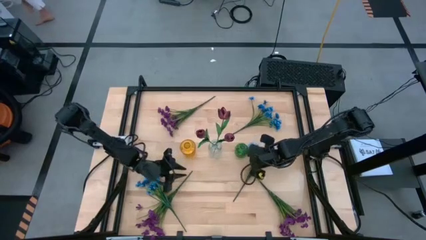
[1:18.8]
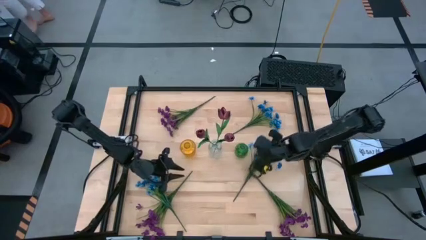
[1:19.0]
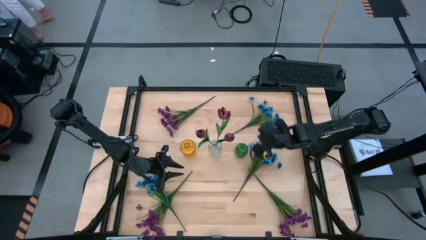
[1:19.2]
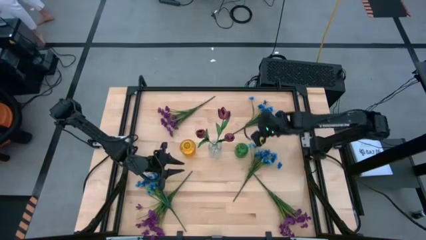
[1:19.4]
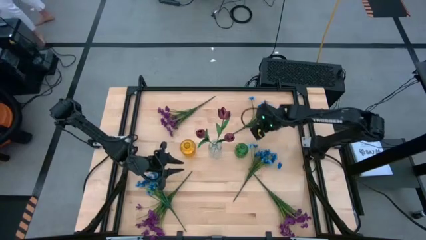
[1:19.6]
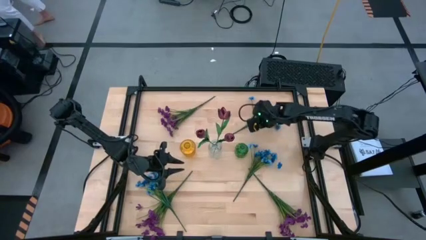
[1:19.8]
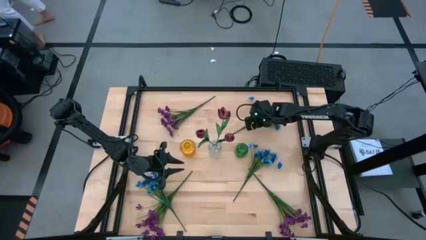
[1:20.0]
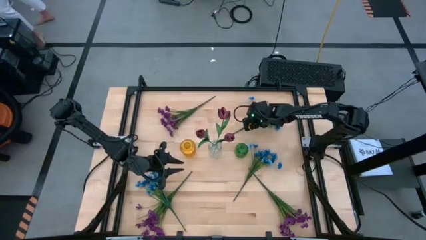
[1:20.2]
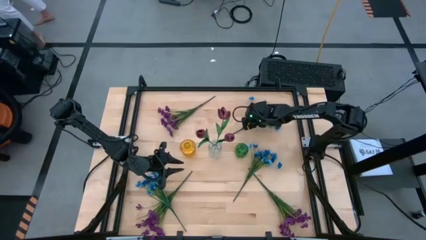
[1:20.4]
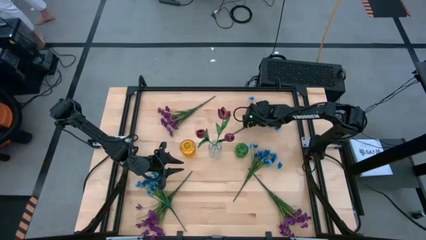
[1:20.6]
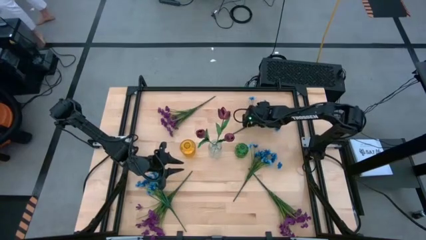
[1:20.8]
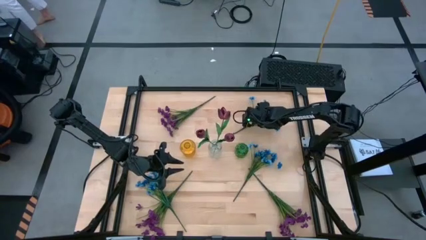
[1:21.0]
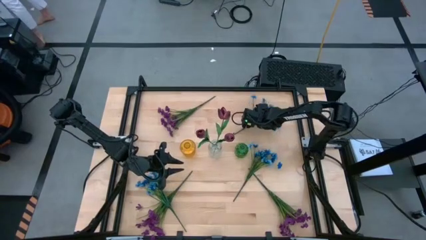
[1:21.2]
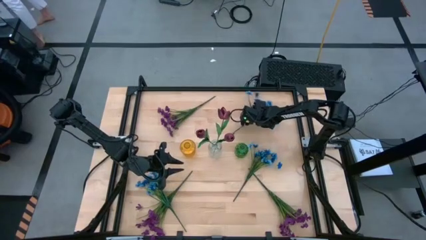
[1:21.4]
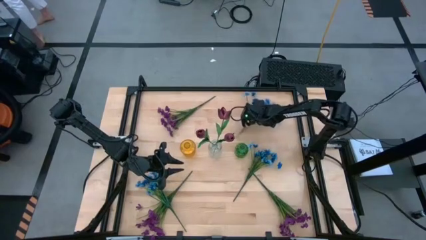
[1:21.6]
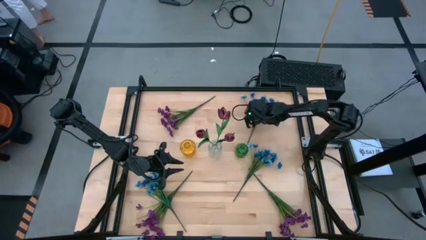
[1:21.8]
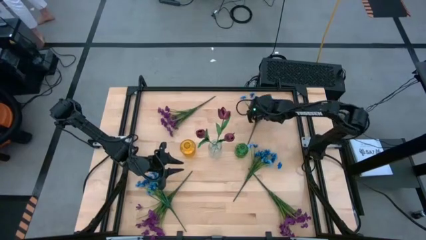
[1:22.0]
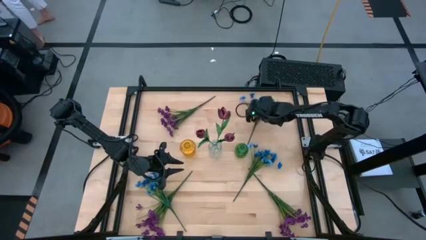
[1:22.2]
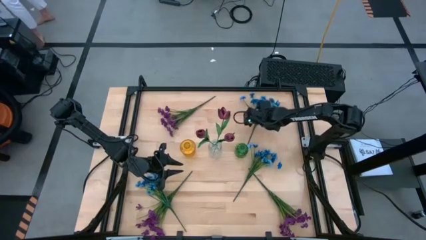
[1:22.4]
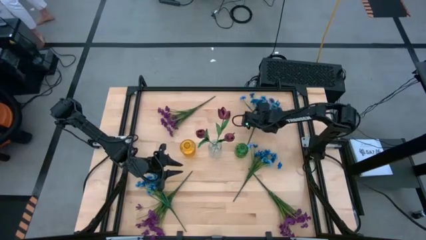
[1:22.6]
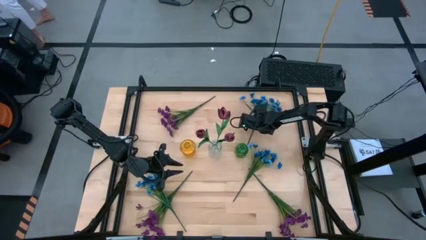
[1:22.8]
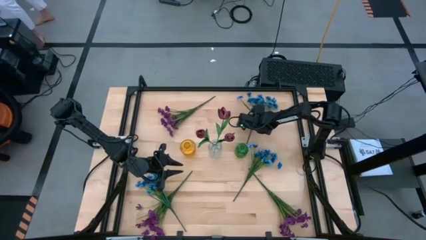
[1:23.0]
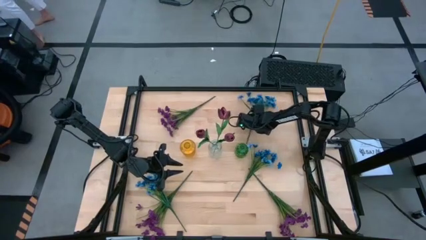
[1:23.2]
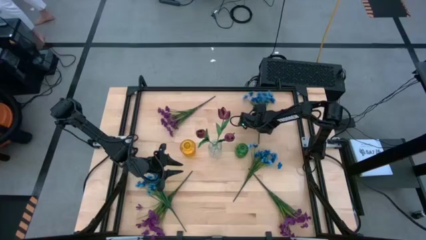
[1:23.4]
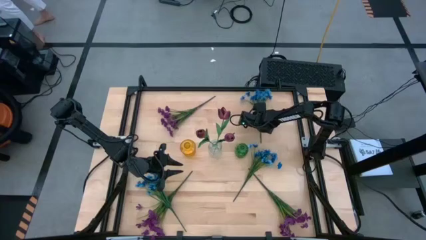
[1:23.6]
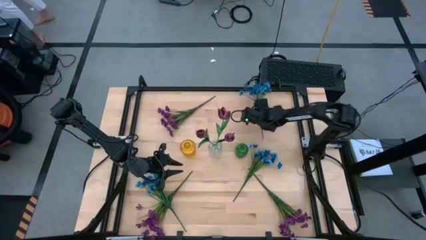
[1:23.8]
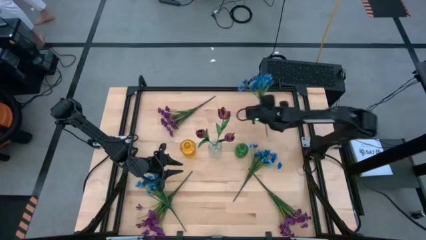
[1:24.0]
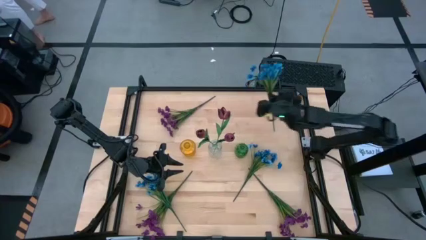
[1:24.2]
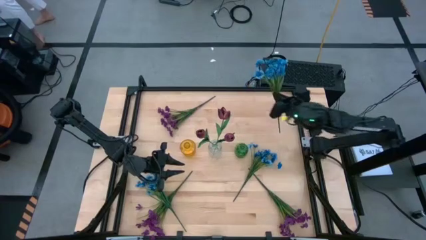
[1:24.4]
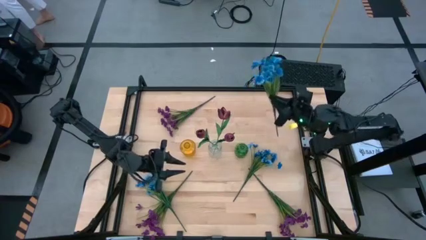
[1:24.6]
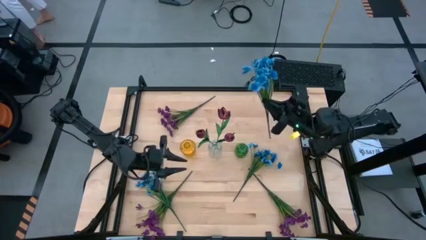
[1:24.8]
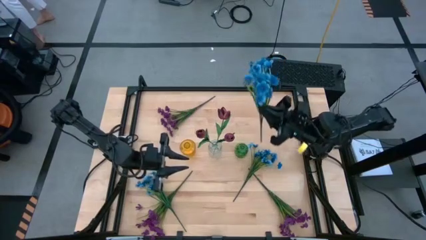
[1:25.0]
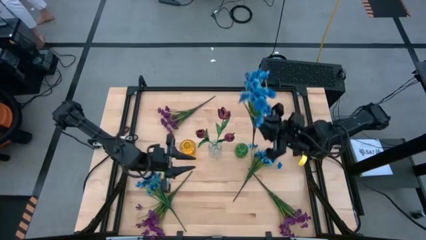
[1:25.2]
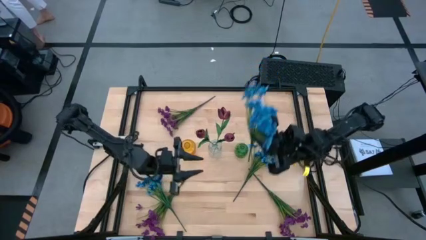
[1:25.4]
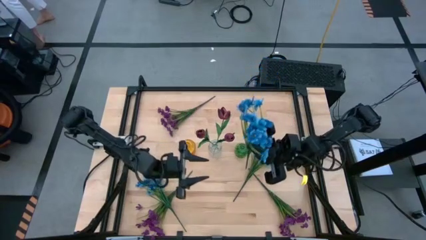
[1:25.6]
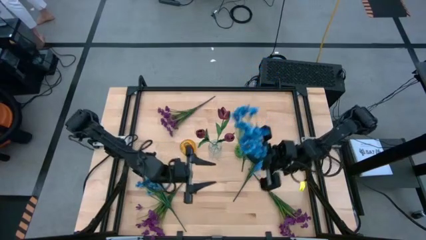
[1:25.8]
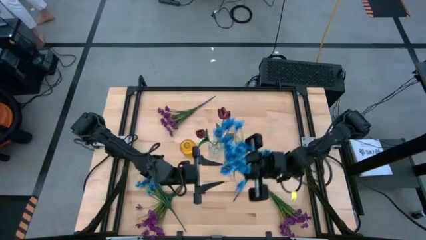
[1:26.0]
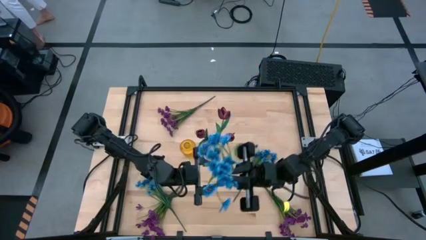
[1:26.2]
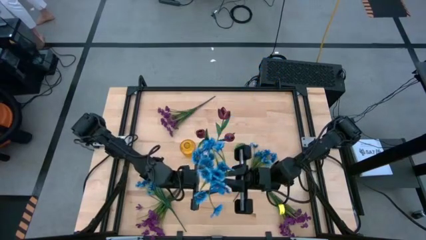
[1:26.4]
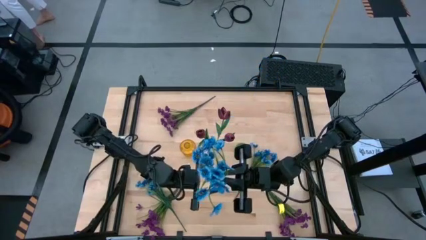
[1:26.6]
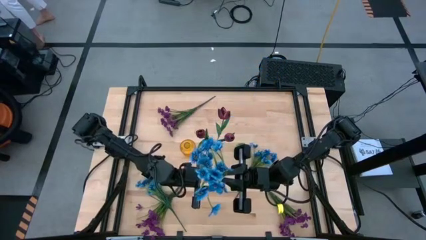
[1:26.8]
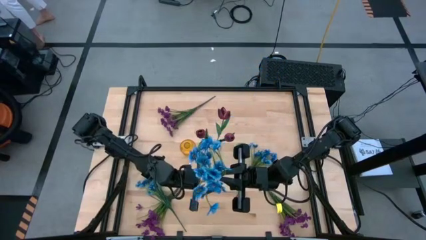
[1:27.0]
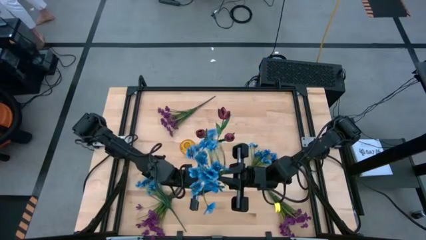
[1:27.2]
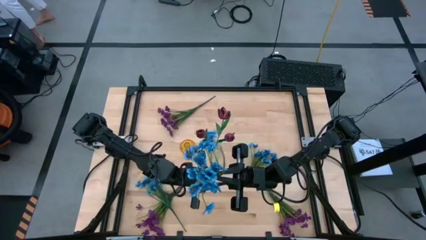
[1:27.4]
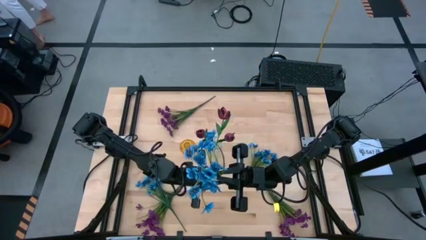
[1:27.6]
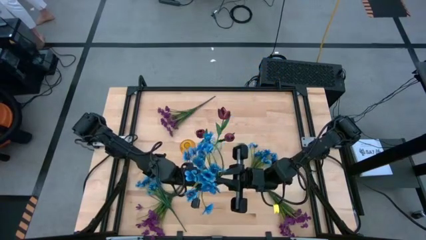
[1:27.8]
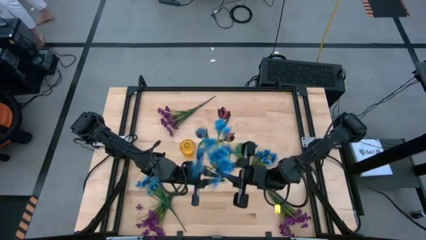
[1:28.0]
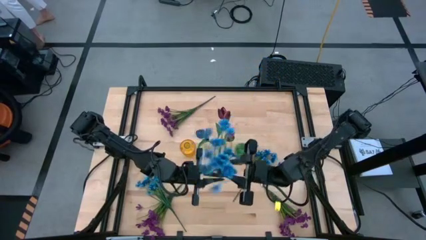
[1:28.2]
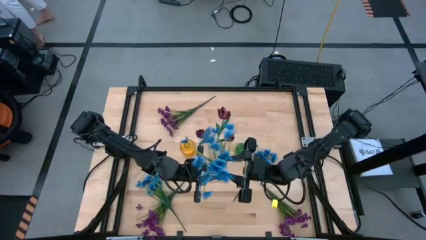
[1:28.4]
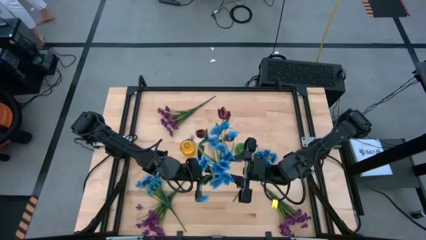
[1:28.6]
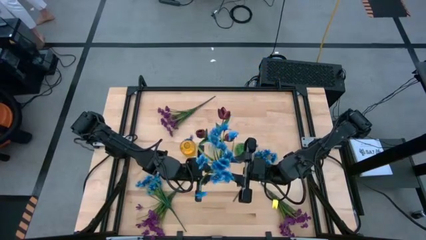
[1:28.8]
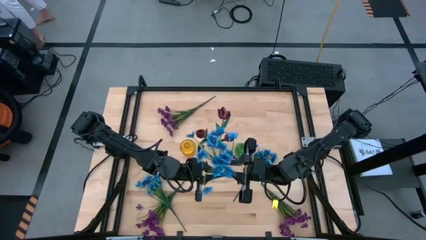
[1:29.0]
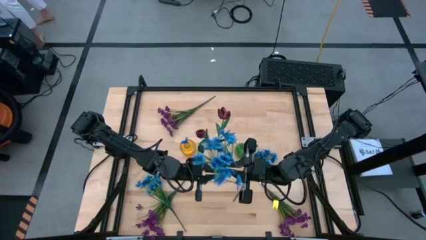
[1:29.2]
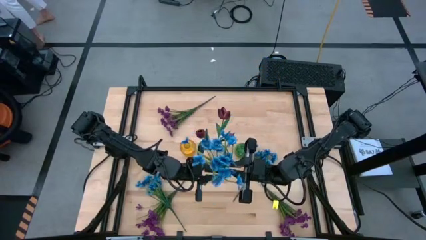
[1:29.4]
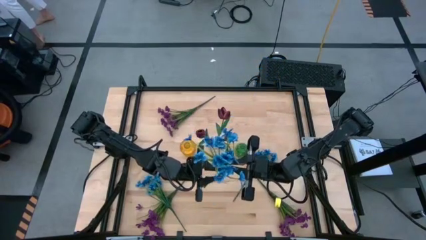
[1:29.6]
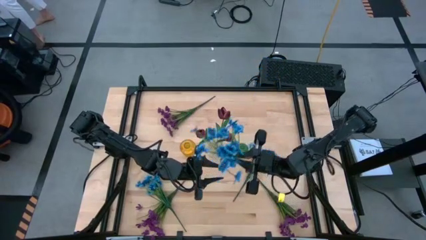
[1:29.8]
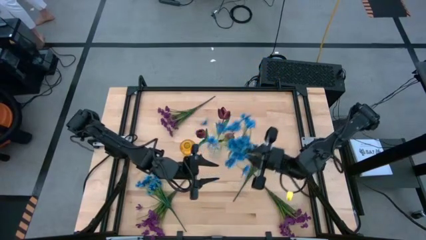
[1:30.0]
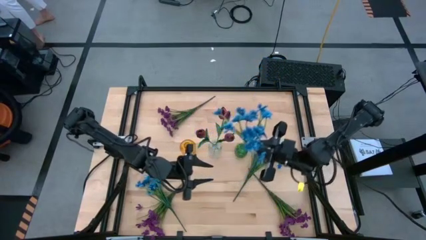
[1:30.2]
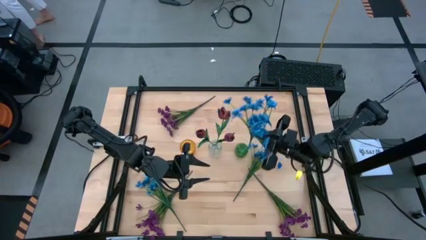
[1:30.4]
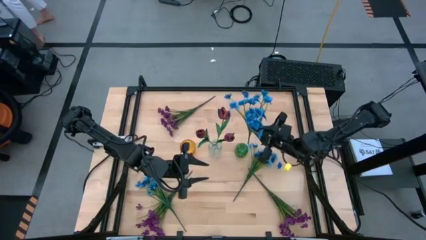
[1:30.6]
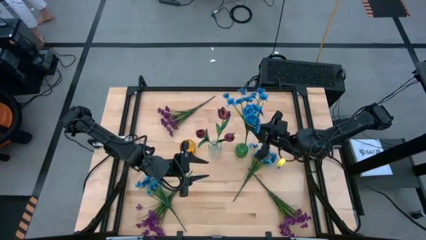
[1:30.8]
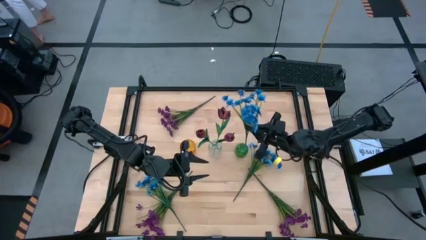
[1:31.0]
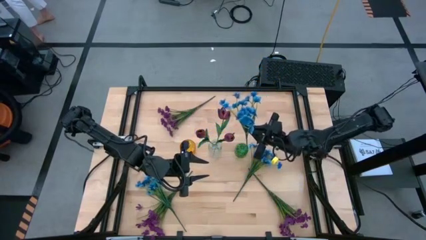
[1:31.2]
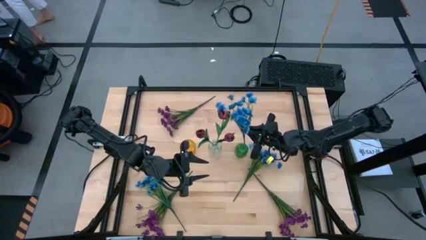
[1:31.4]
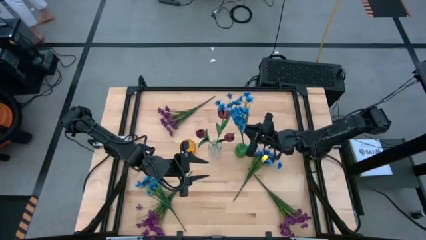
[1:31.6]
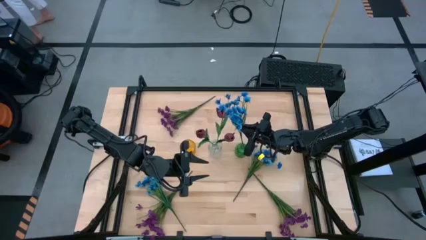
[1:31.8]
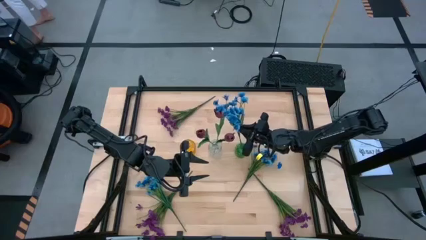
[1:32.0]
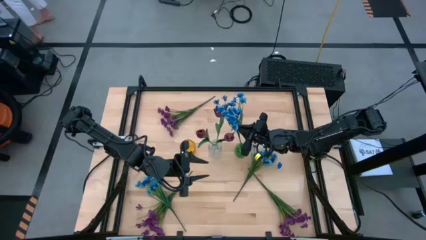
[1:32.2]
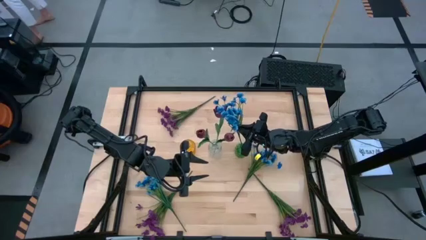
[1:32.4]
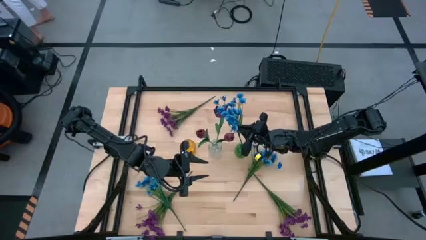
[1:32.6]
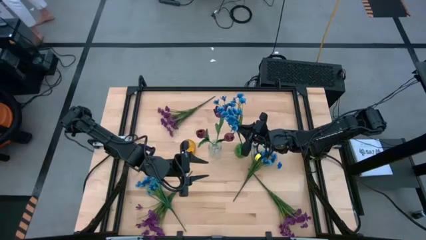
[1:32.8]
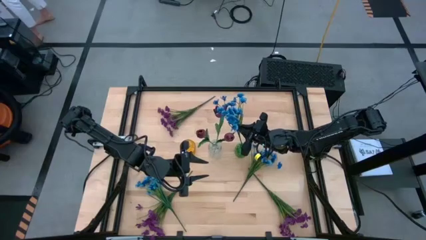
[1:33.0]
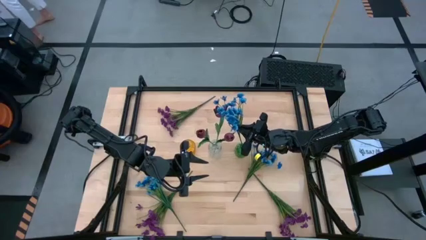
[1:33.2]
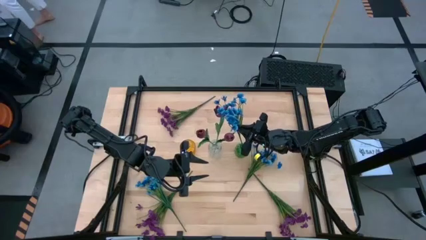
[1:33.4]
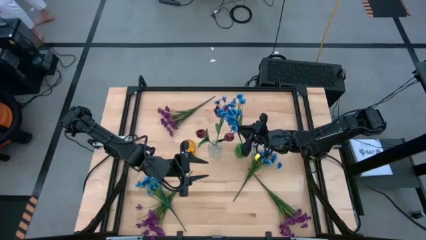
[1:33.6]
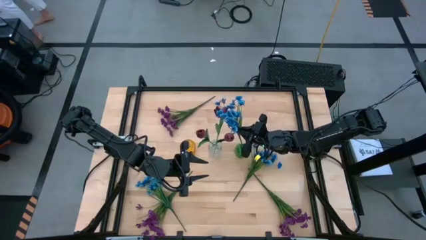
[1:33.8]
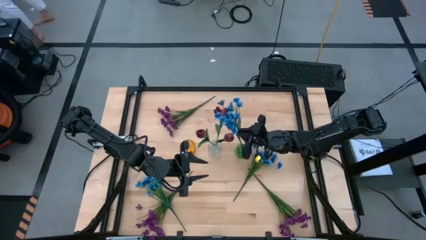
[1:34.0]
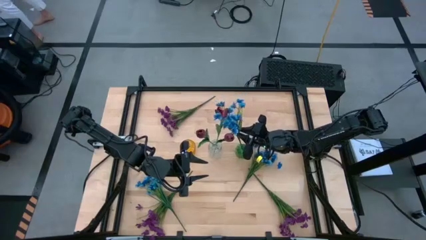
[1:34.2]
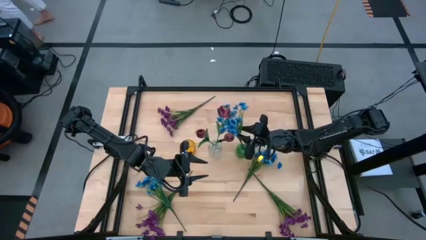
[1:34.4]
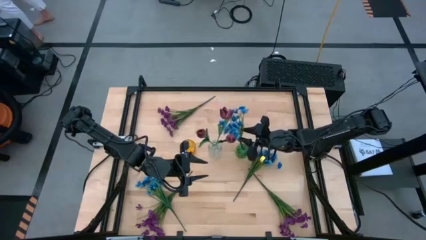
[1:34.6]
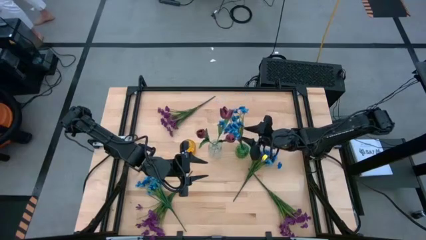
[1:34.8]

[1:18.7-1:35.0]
Task: Sort flowers into vase by color
Put the top blue flowers into the green vase
